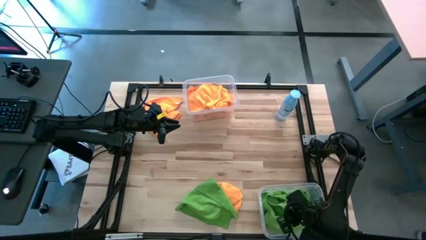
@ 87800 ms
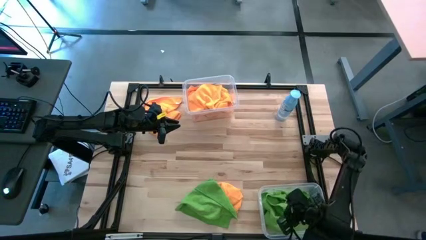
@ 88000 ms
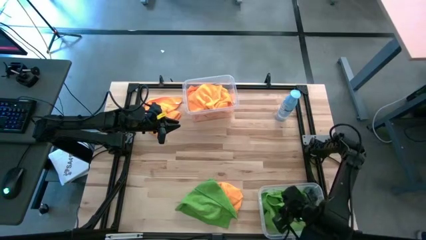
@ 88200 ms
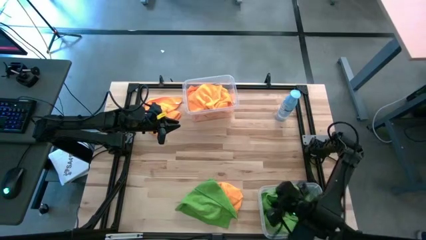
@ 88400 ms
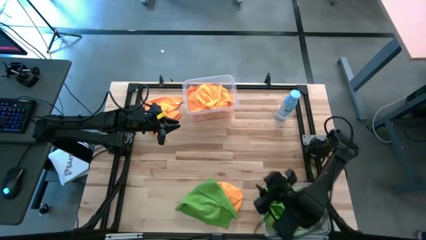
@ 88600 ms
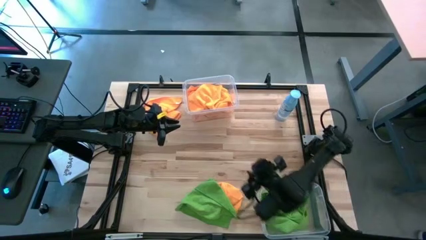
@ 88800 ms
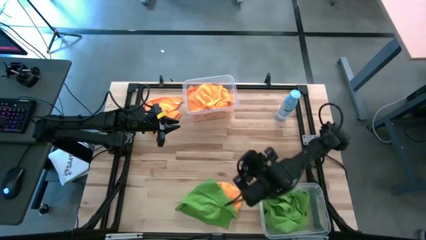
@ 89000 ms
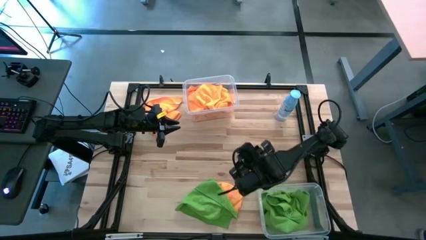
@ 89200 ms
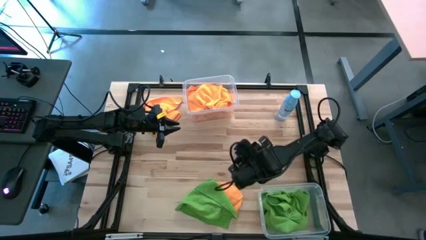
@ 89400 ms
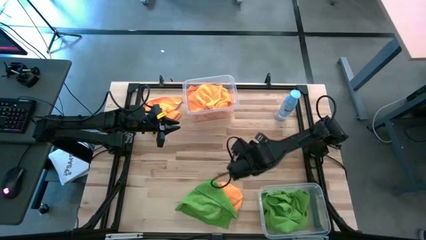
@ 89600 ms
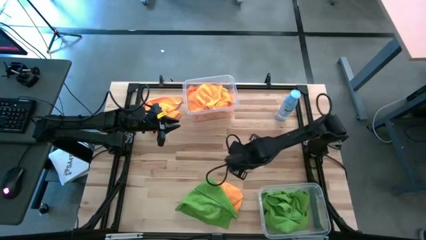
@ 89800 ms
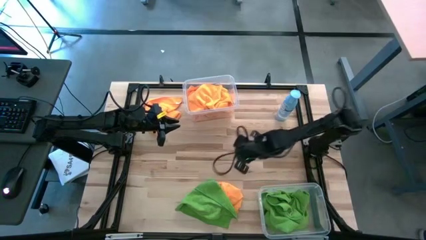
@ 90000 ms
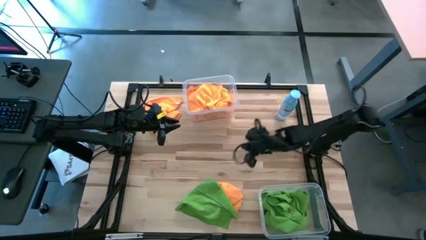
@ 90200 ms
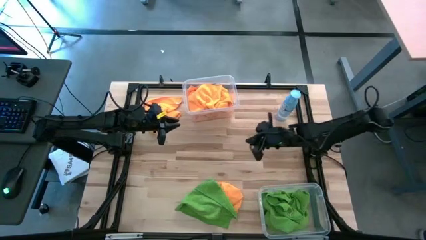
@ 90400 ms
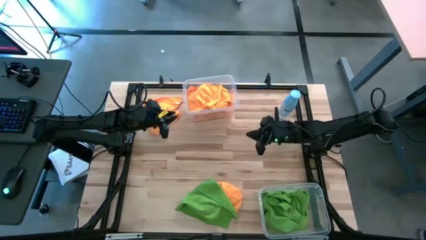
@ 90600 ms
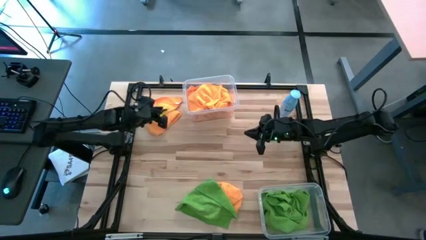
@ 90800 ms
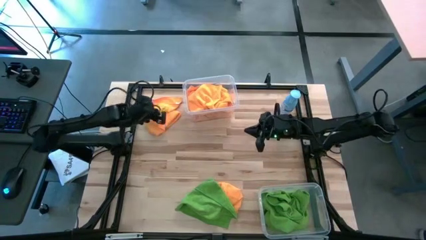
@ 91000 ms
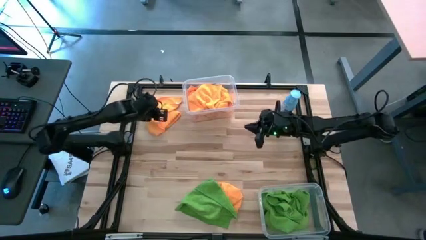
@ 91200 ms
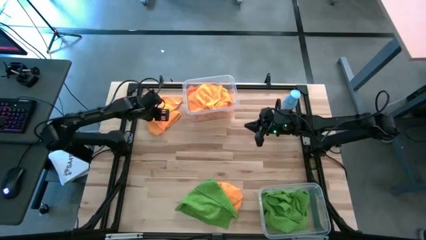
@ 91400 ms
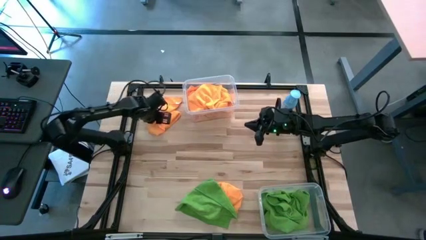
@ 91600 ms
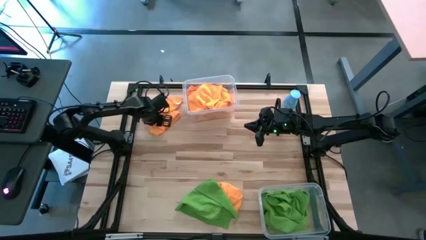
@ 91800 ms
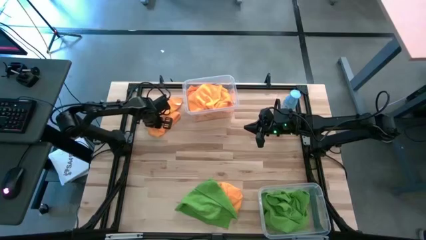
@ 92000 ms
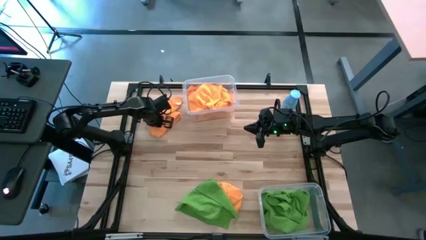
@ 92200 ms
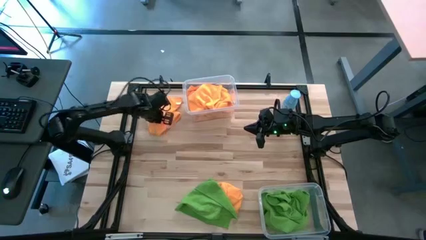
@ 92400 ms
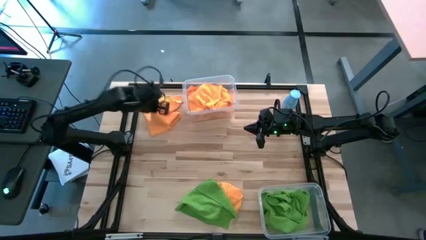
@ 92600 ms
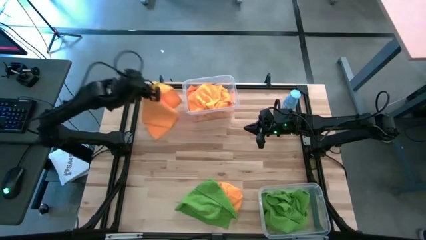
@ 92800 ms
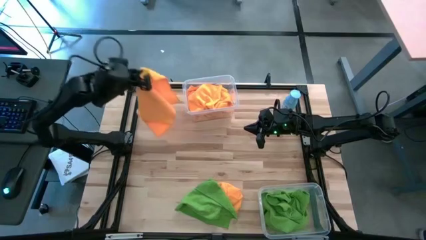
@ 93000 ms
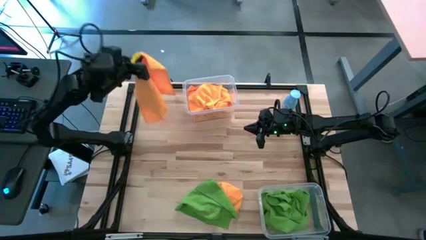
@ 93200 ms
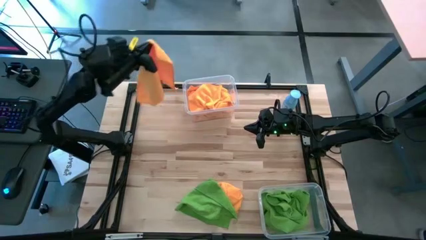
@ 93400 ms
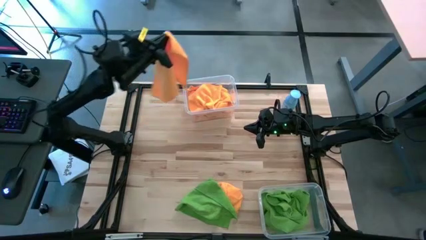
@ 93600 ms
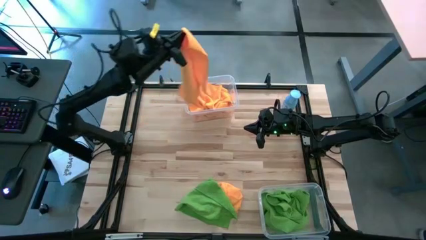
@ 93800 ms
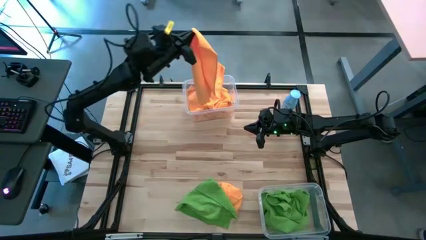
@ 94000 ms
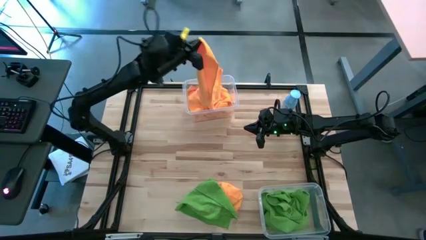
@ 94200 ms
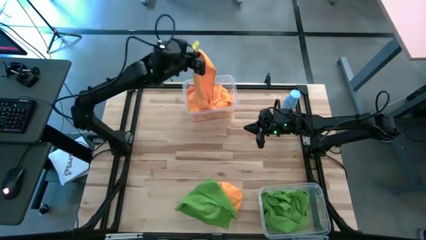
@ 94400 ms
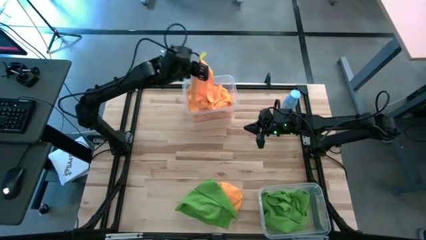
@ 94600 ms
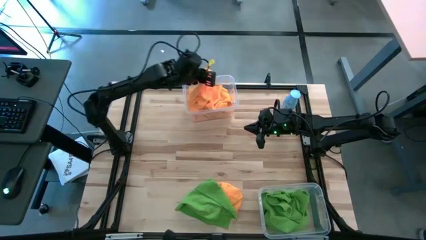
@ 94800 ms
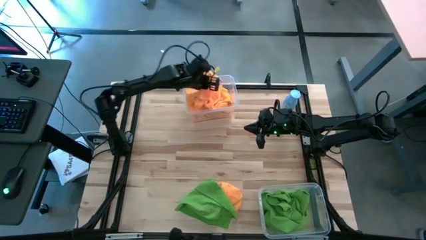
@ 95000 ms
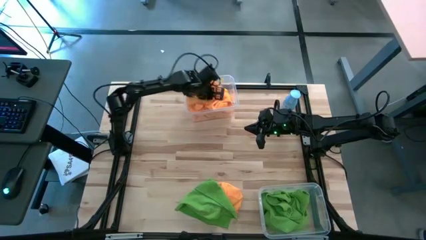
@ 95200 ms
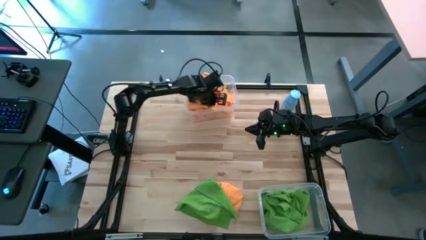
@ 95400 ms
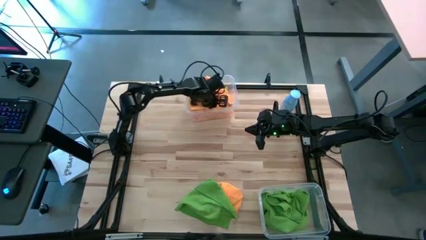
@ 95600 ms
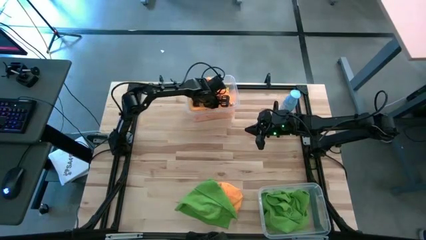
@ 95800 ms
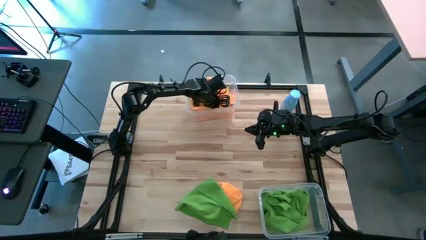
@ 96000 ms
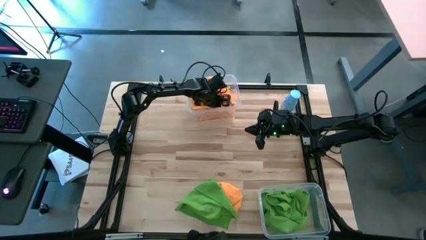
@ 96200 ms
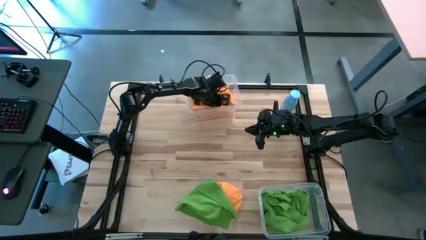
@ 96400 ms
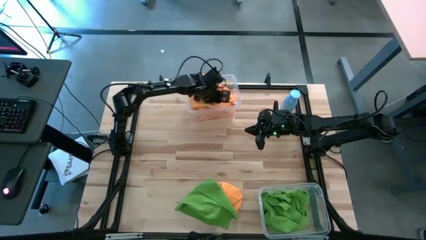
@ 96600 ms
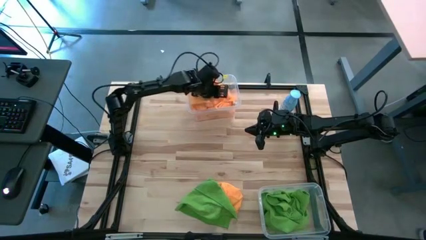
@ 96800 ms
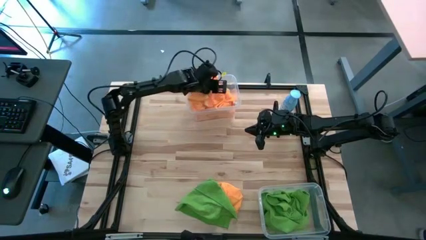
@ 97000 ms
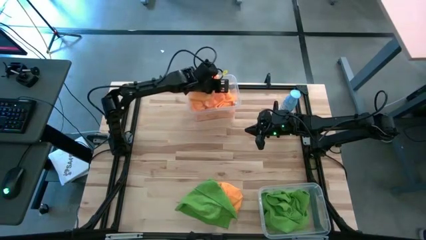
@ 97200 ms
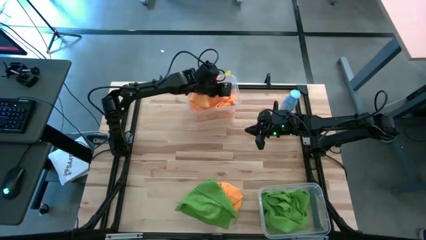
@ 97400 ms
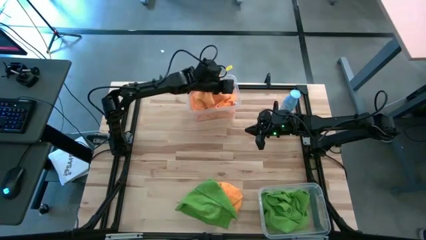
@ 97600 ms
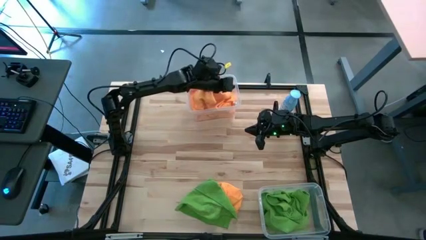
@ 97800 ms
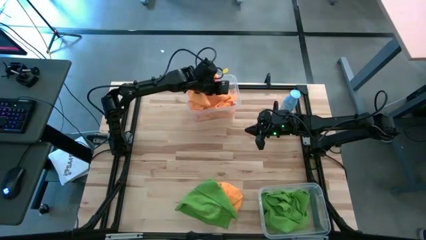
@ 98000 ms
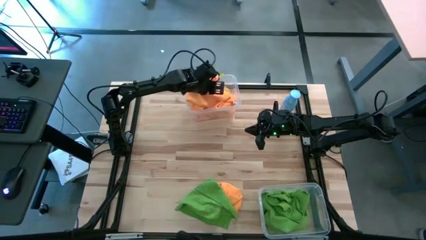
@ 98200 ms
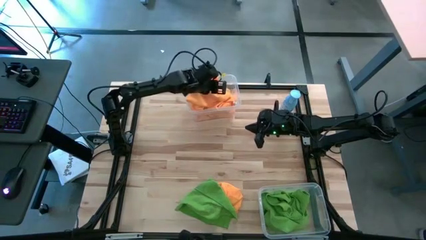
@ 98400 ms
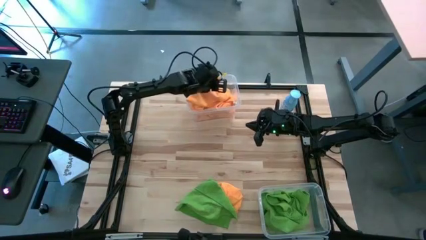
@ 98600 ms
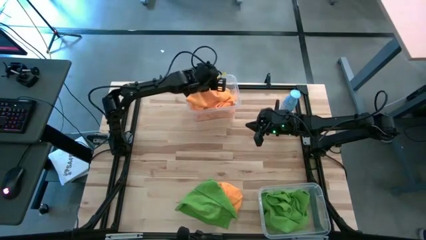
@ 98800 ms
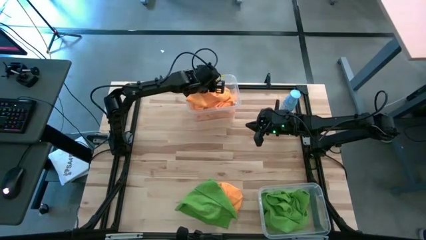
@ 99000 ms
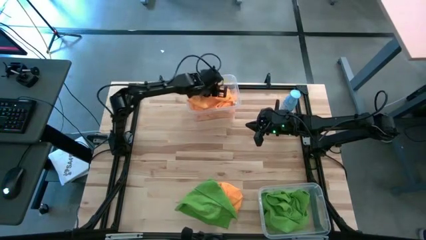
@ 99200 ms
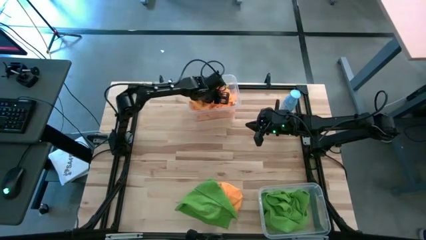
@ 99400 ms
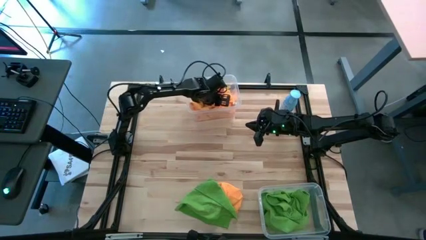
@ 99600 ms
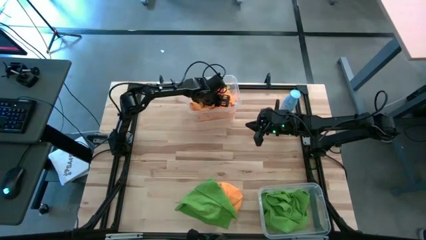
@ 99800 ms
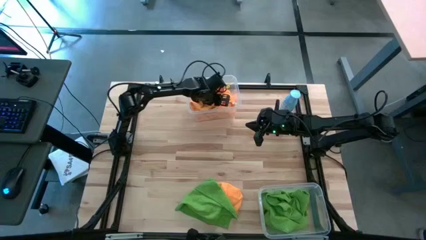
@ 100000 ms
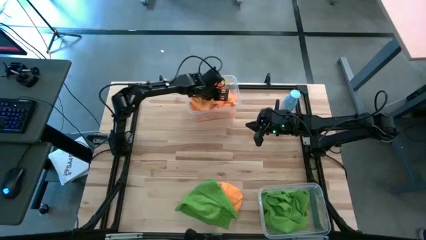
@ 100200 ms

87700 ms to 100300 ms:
Task: Sort microfiber towel by color & place in baskets
Put the orange microfiber towel into the top transparent bin
